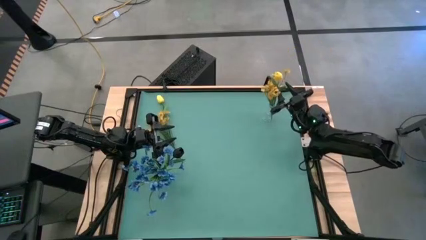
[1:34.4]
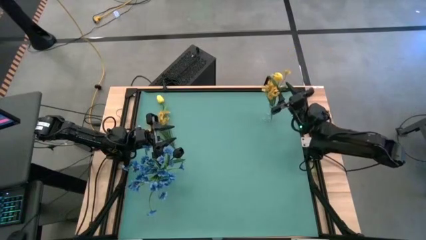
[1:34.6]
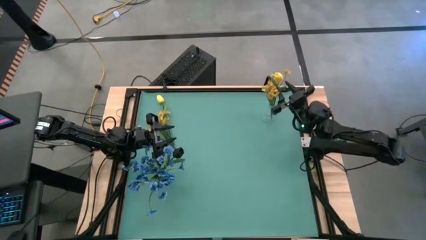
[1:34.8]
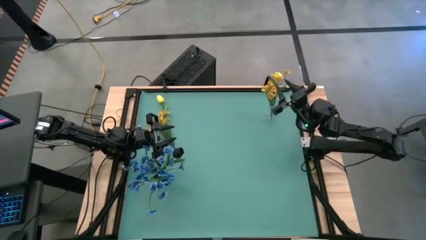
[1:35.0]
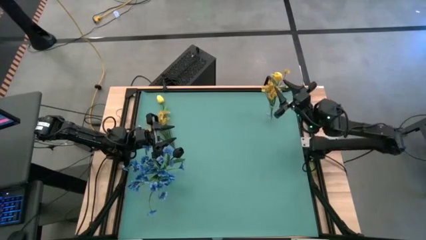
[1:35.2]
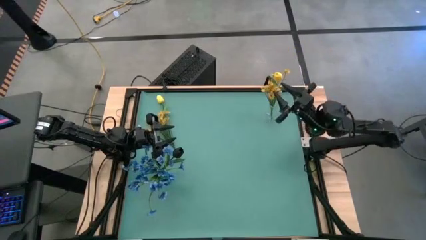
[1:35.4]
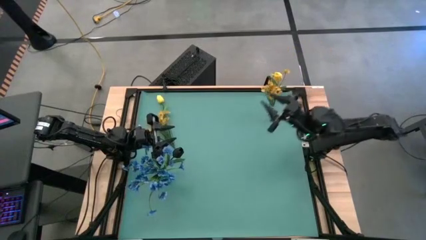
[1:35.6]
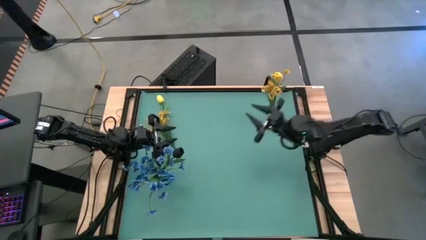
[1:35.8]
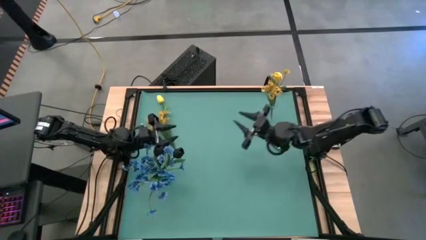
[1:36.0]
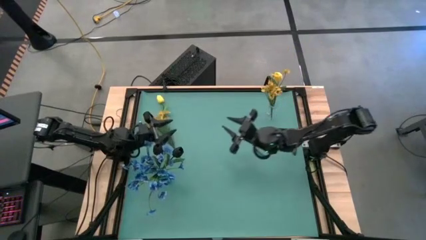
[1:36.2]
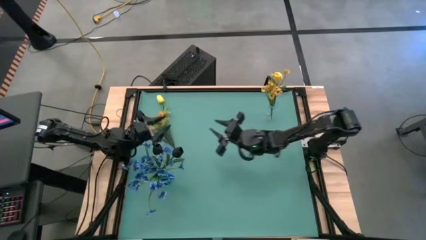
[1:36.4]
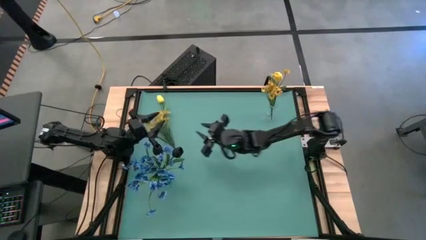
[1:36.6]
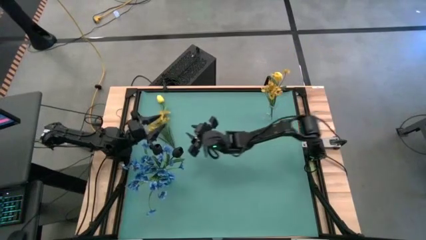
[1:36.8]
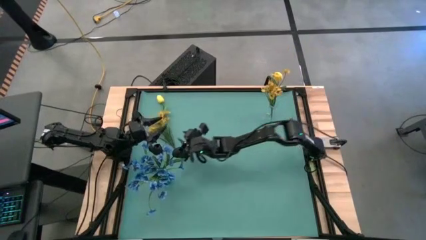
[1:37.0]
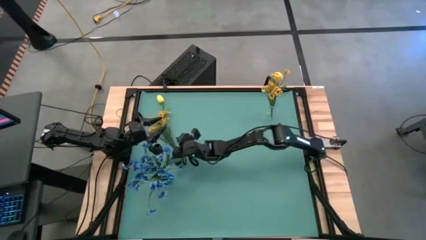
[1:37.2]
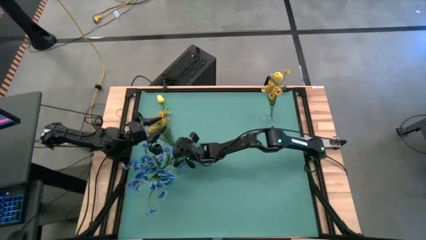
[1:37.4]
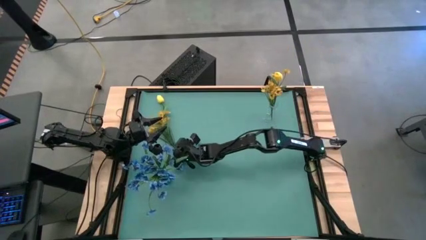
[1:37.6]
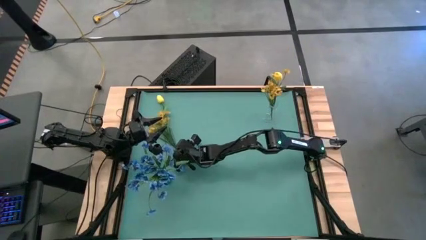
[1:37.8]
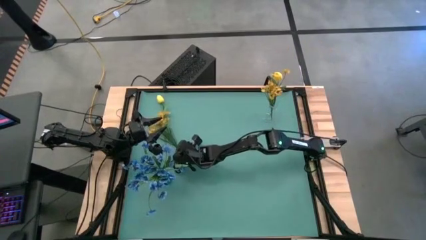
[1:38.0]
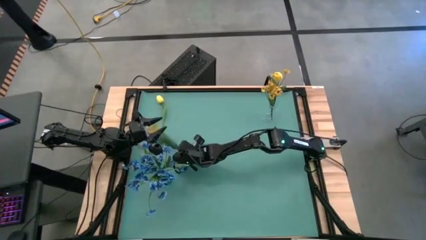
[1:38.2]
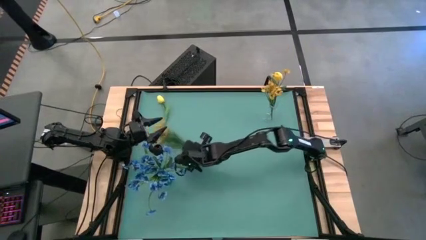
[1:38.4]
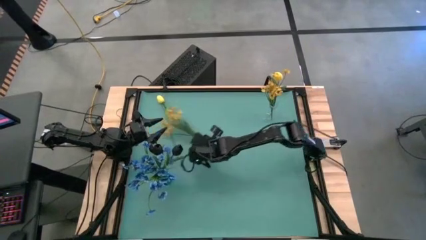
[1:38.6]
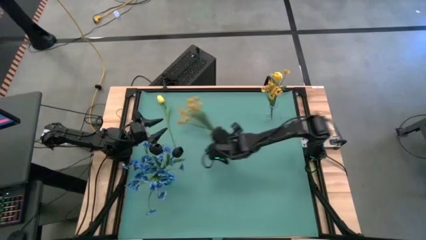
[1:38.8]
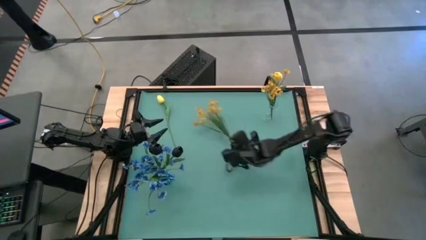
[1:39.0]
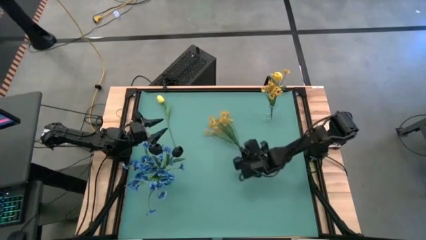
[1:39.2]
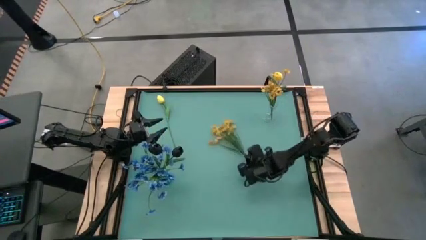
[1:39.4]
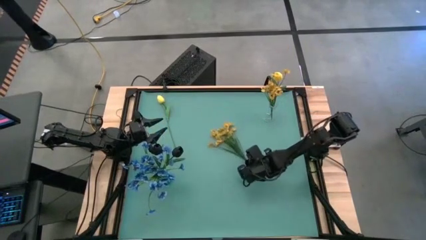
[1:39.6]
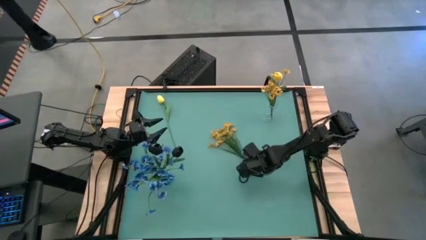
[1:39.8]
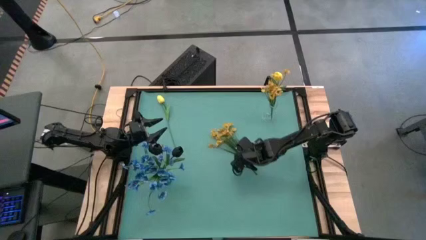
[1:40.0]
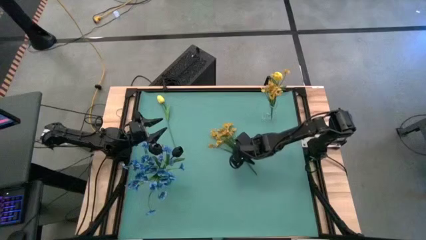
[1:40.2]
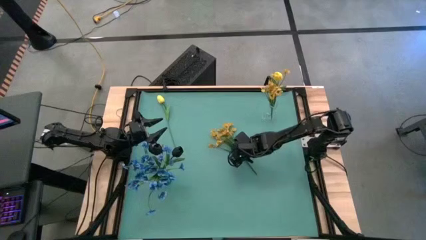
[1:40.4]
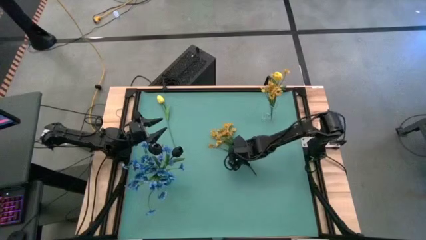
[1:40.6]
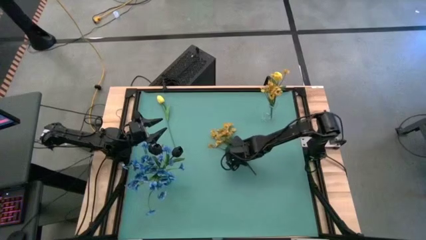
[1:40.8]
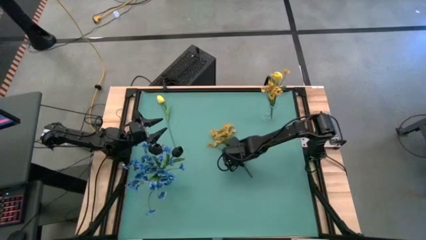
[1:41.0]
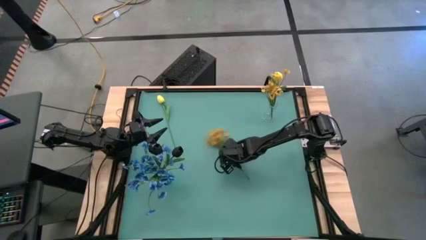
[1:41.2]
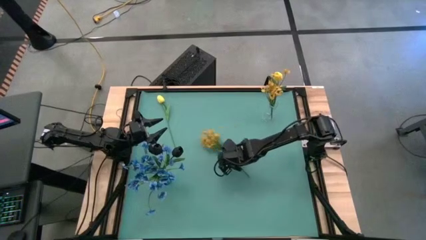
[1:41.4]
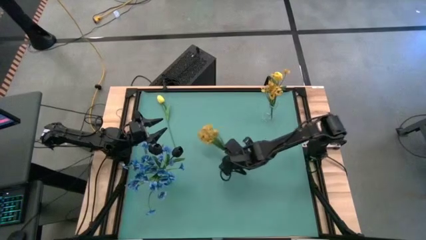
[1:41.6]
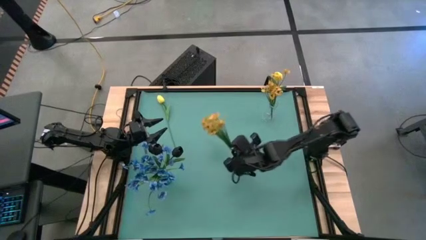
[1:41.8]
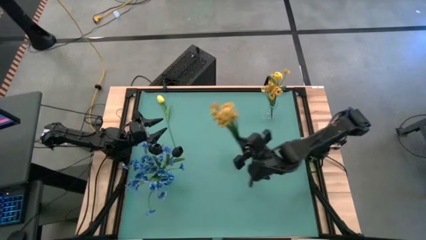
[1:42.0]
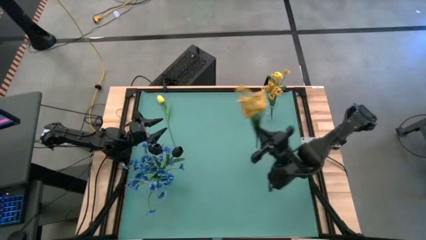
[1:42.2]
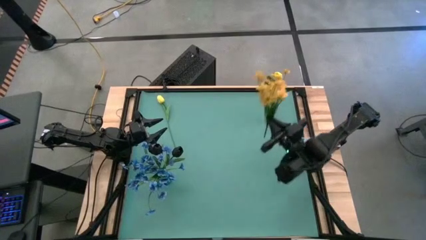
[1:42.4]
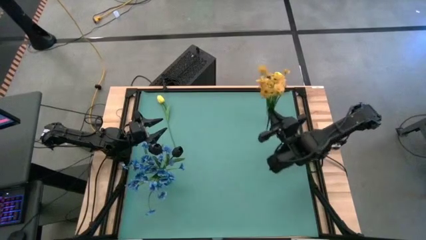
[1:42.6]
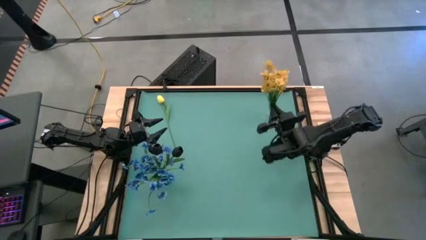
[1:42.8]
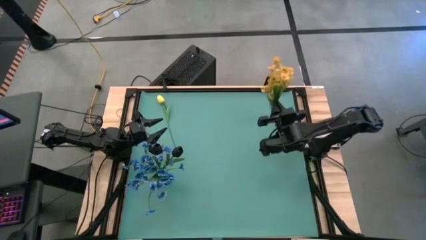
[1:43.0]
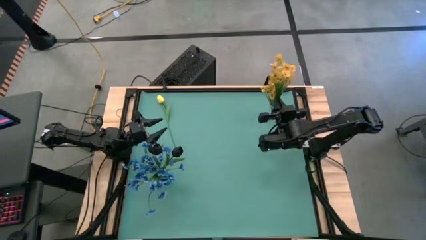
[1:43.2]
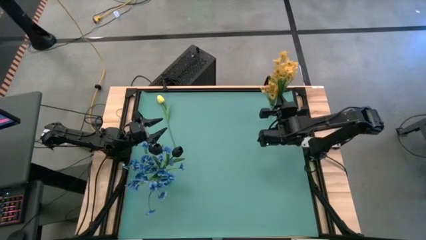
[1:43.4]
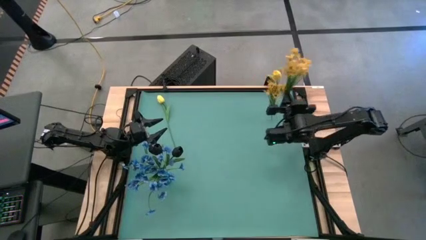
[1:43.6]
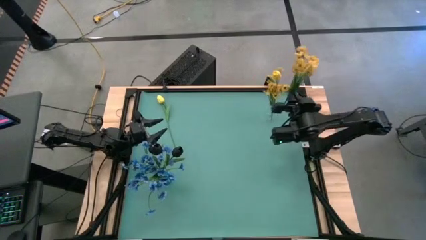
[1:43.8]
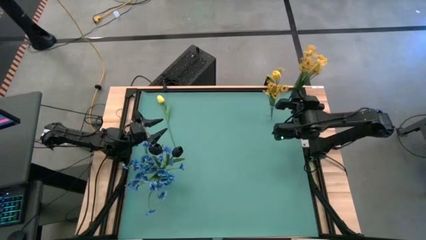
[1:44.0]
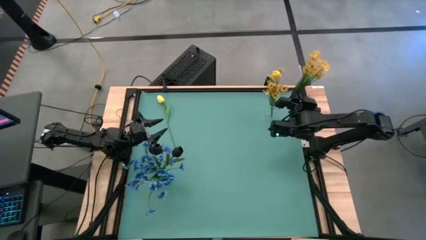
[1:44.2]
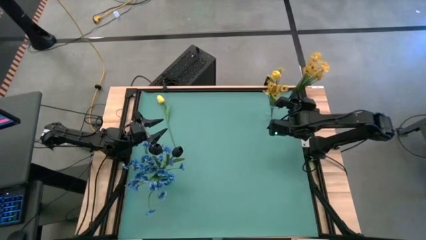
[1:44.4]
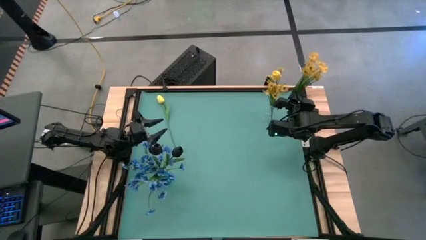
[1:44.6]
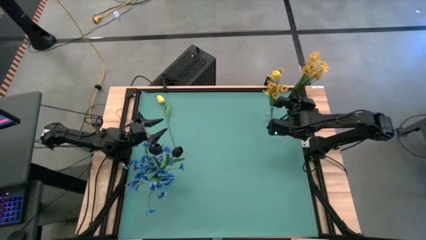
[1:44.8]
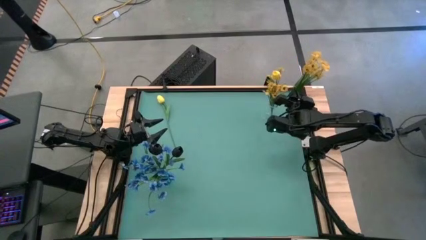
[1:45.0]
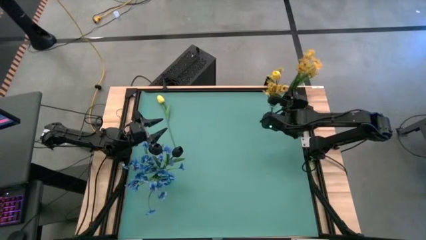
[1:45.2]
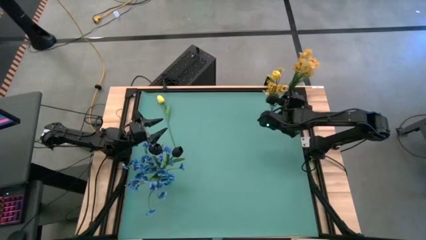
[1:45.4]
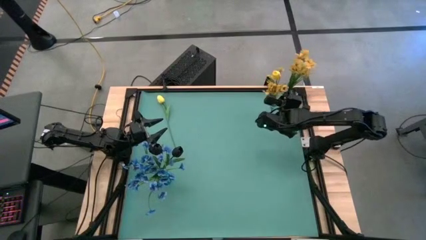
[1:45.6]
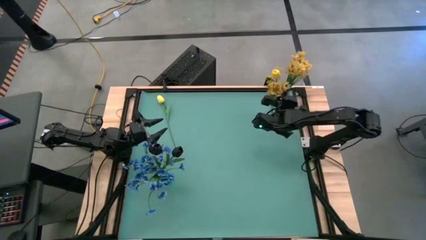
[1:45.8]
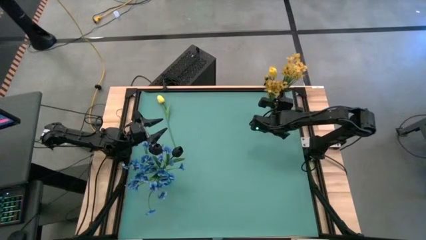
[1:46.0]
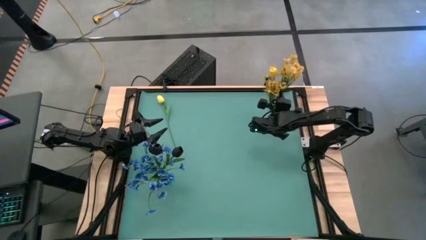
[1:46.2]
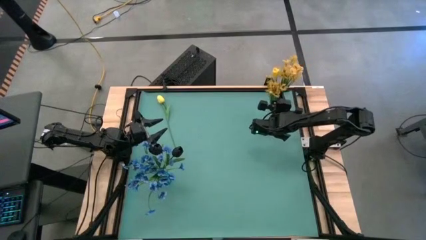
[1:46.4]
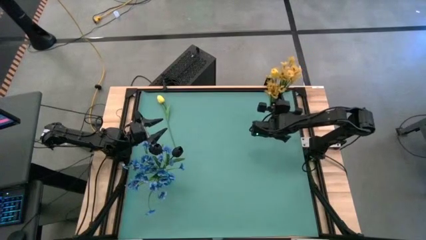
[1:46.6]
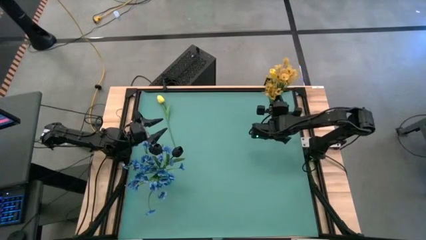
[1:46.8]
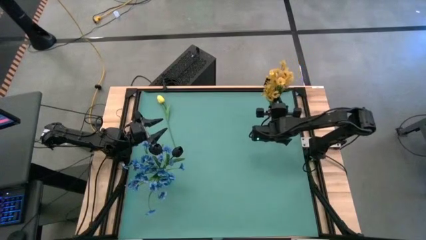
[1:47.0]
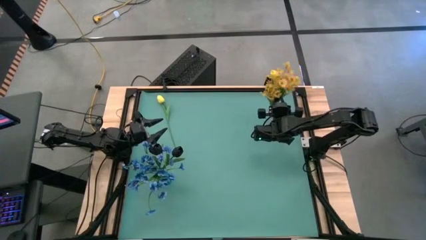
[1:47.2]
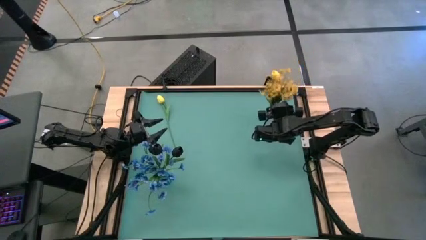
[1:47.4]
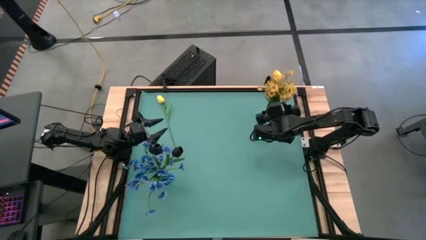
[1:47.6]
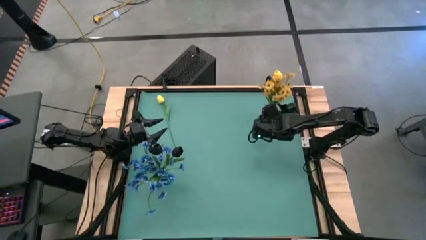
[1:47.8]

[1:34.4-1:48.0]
Task: Sort flowers into vase by color
Put the yellow flowers into the transparent flower vase
